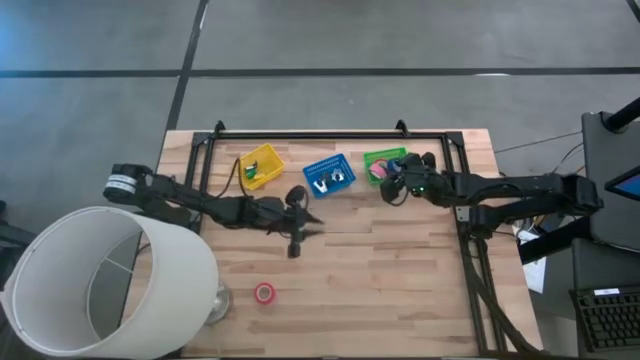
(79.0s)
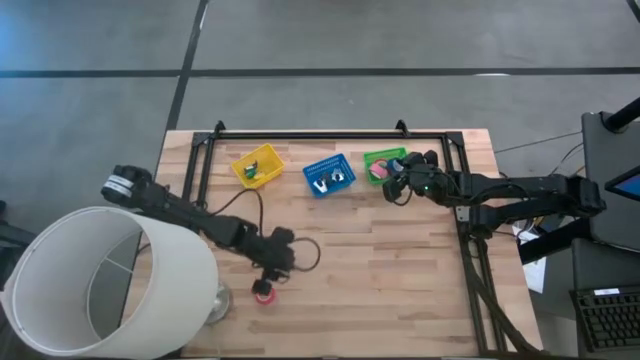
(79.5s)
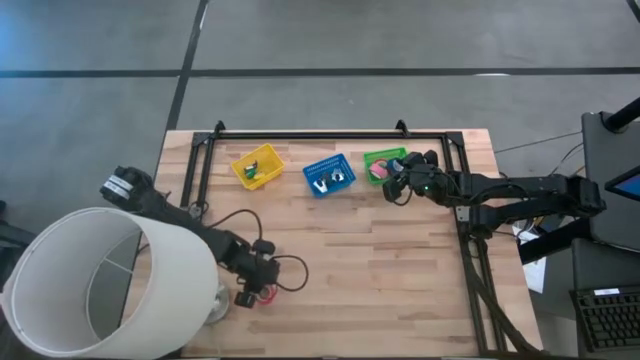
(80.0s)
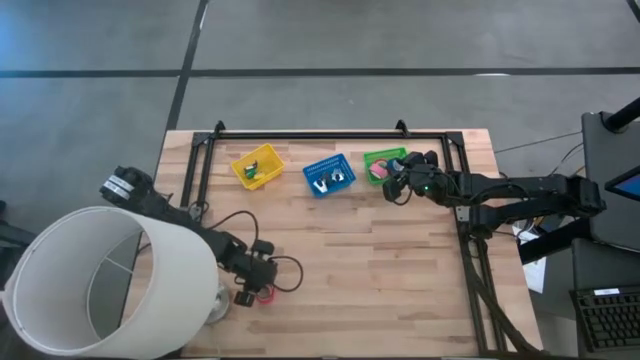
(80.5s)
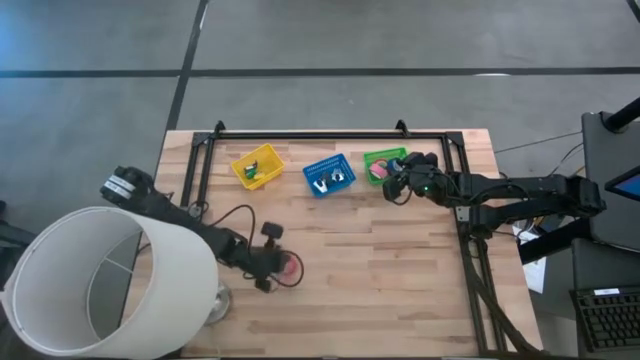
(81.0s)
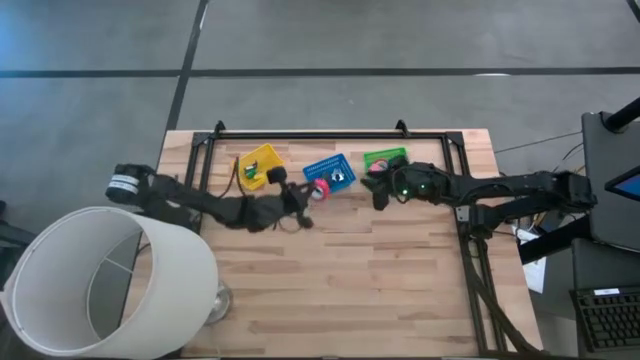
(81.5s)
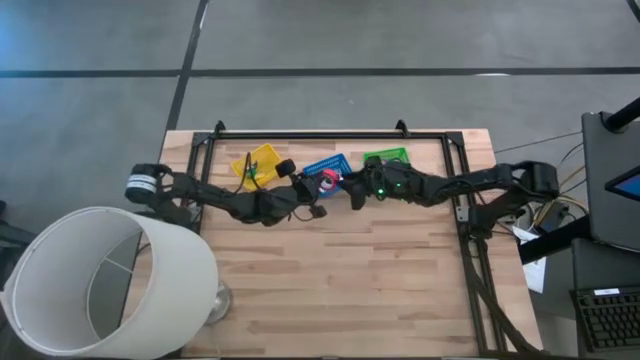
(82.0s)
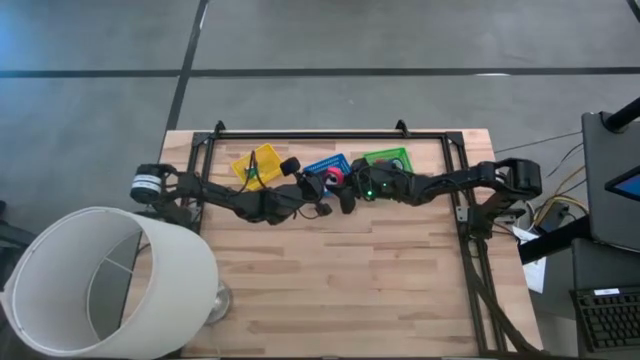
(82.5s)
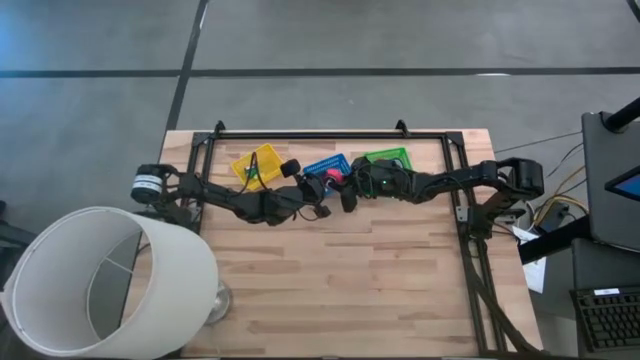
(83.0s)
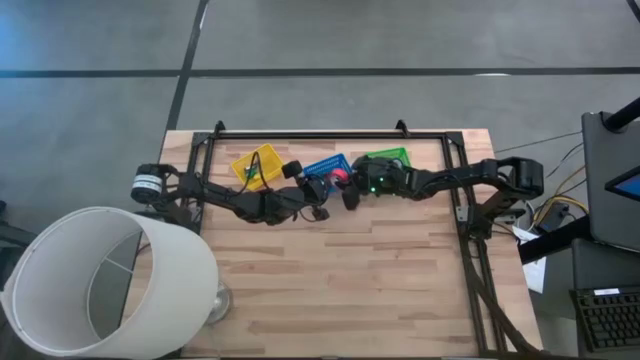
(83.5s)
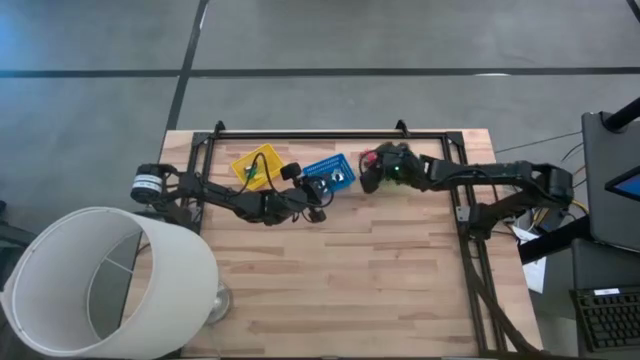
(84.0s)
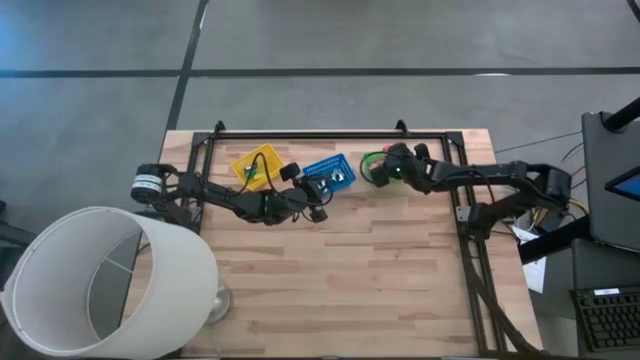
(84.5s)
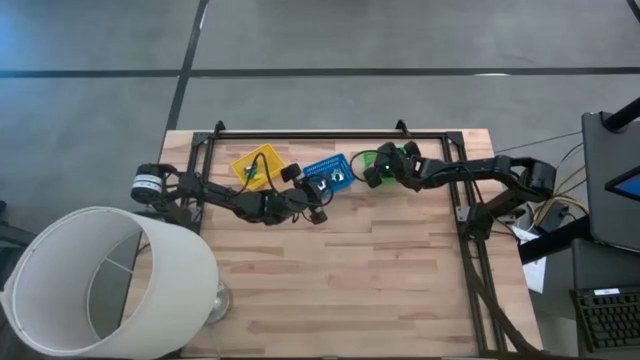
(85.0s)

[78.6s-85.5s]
Task: Pick and place Stapler, Stapler remover, tape
Put the red tape into the green basket

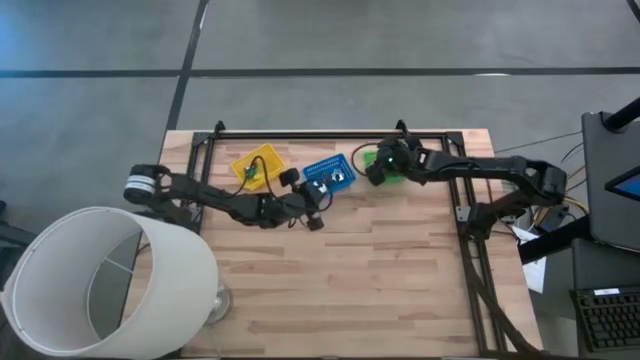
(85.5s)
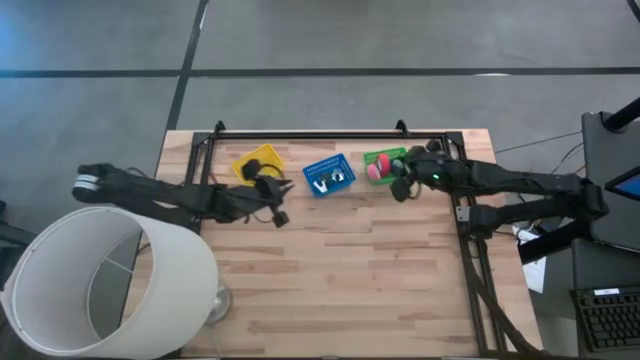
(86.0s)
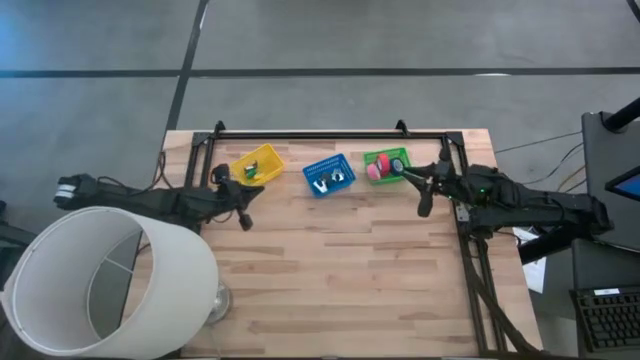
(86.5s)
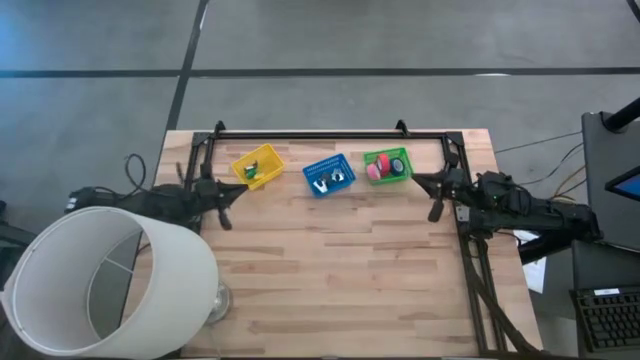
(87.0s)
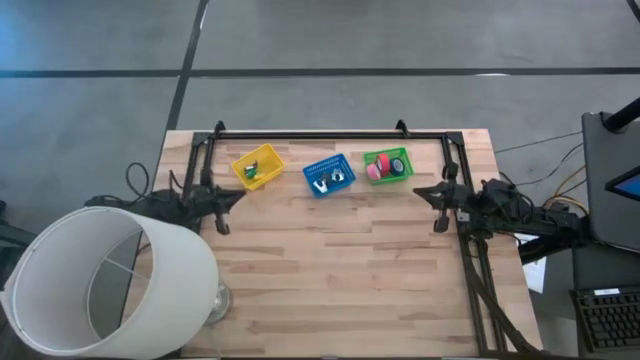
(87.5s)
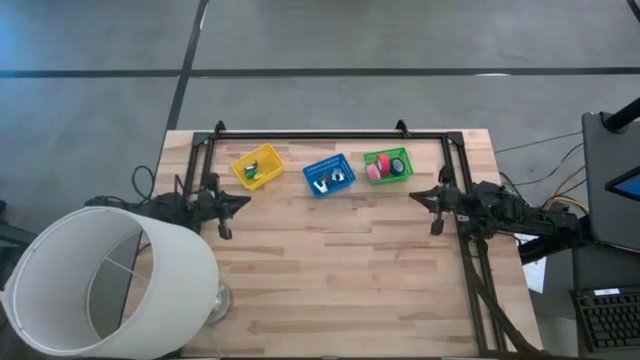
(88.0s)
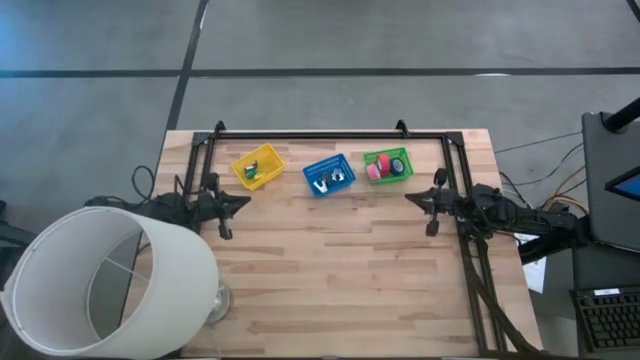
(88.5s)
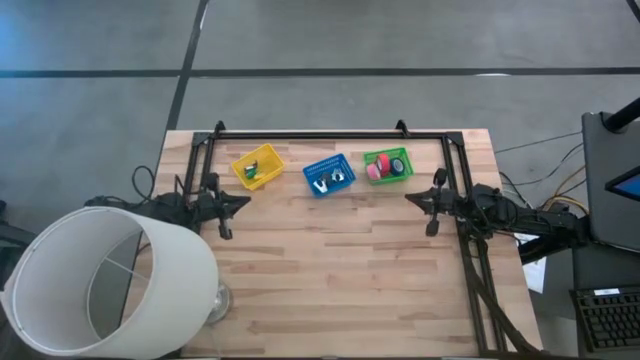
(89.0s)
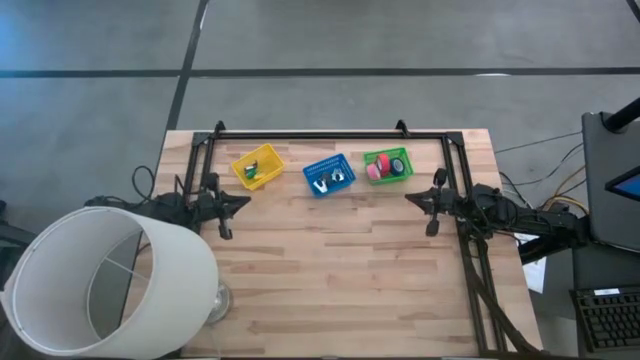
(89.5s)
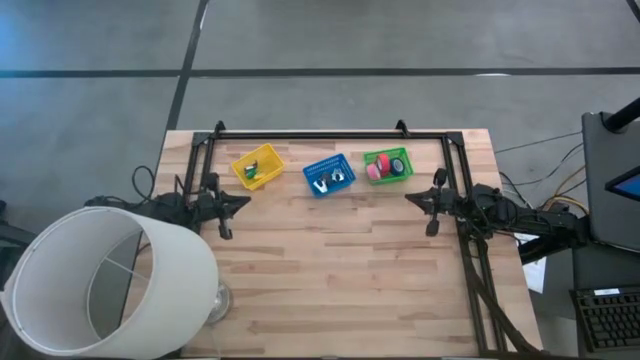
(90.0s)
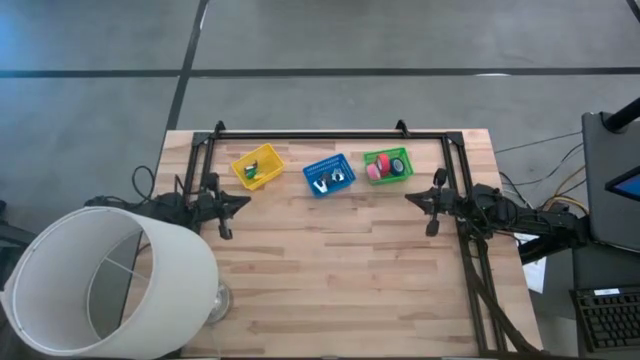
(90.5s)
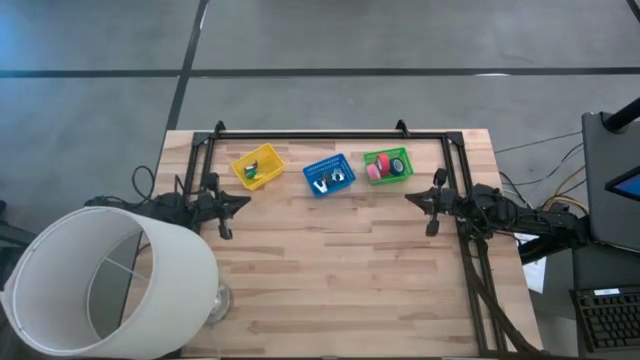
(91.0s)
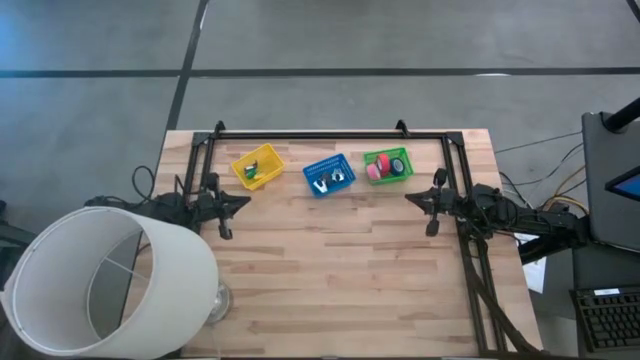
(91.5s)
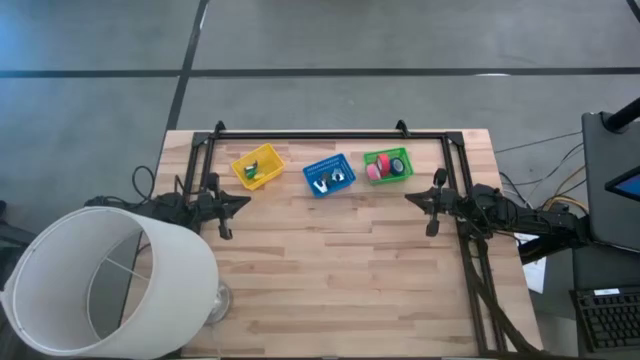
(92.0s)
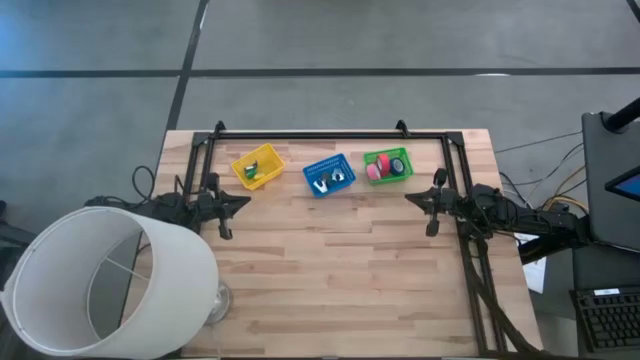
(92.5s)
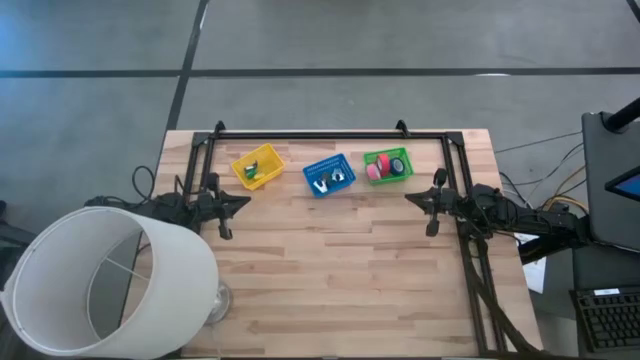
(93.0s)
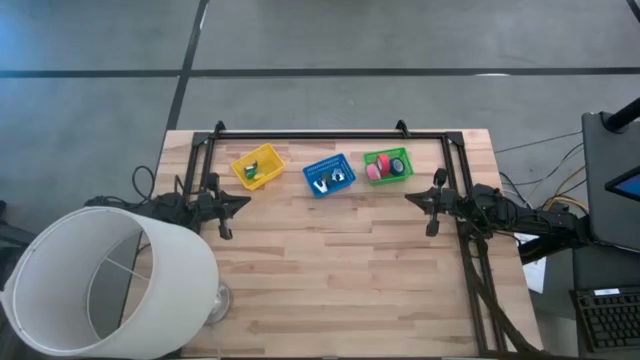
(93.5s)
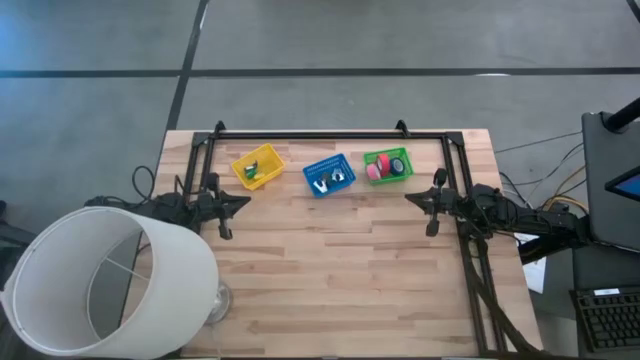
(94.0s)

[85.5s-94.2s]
Return to Home Position

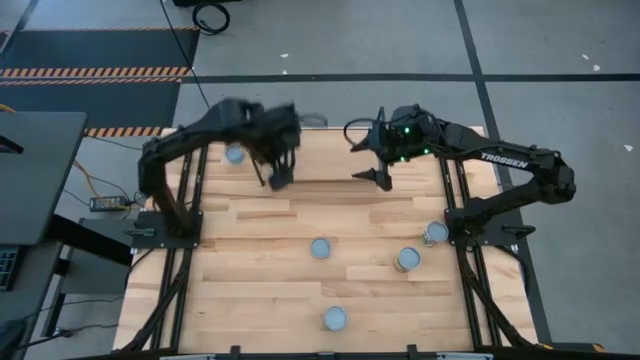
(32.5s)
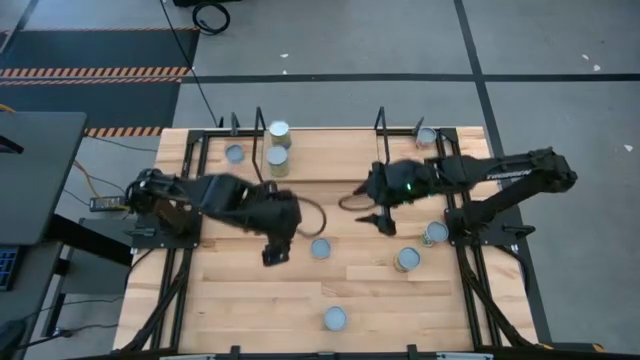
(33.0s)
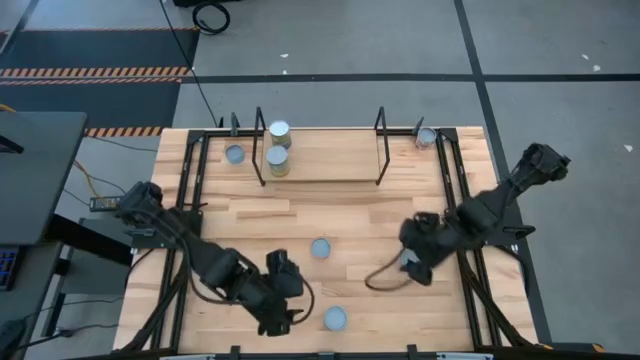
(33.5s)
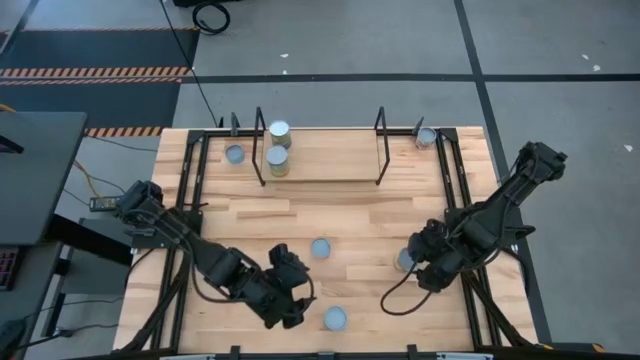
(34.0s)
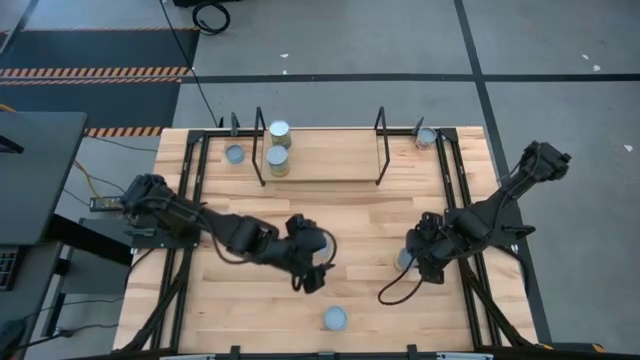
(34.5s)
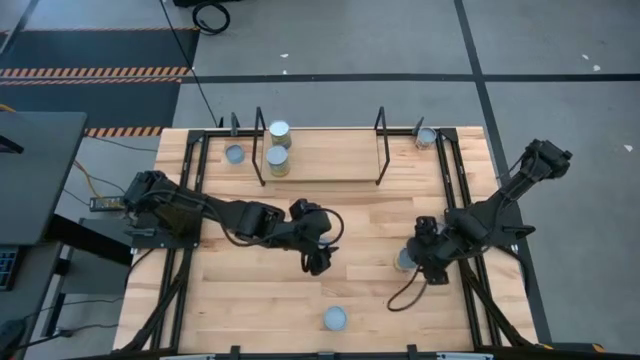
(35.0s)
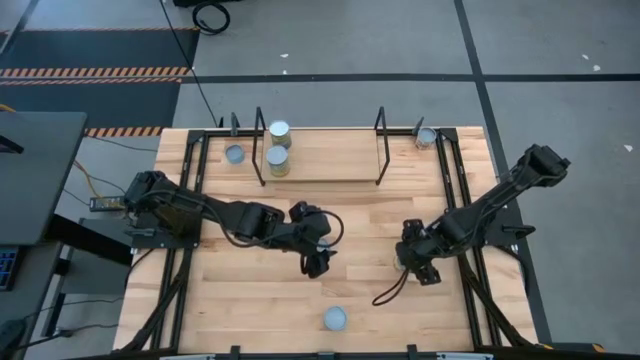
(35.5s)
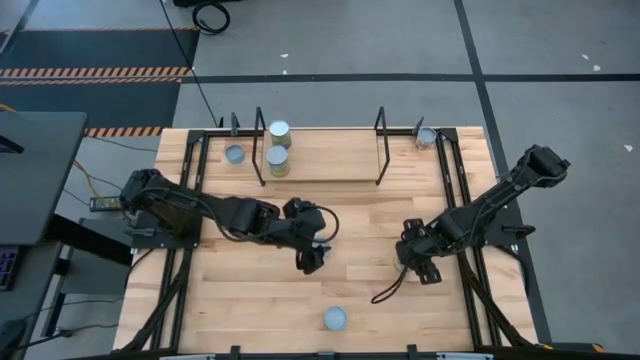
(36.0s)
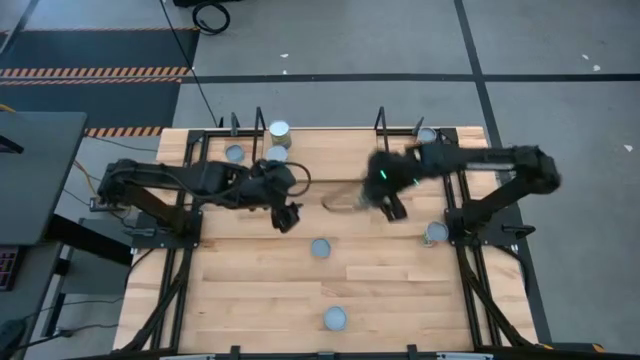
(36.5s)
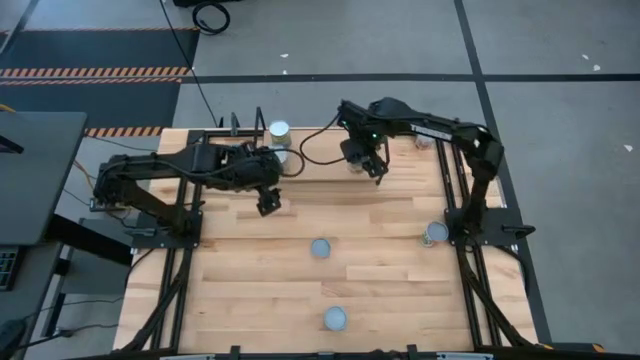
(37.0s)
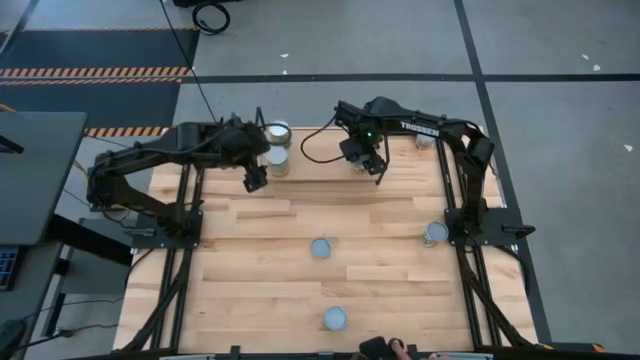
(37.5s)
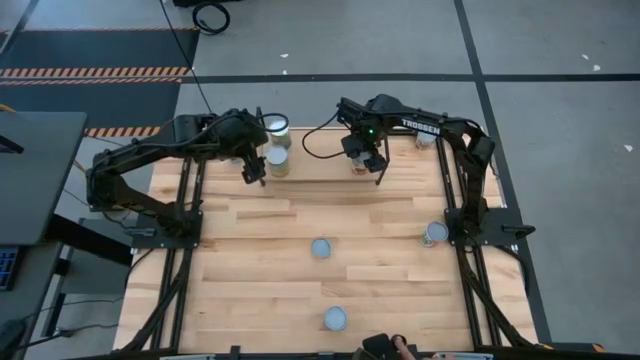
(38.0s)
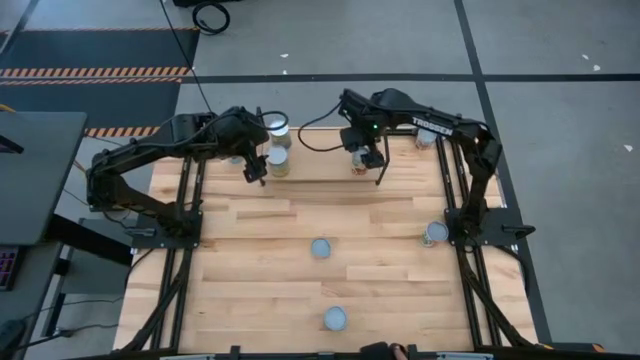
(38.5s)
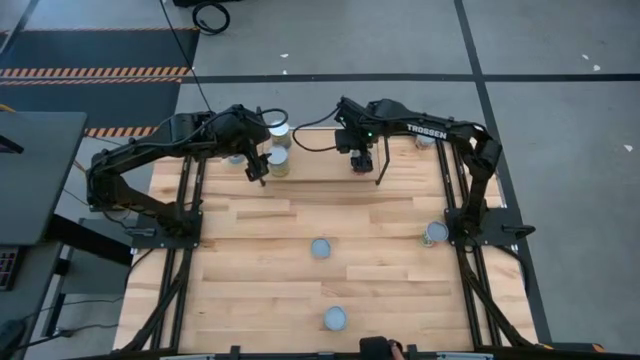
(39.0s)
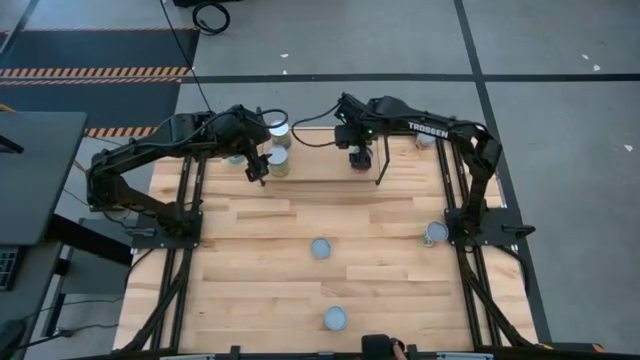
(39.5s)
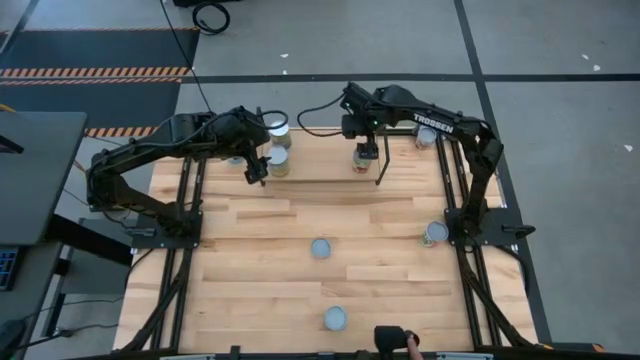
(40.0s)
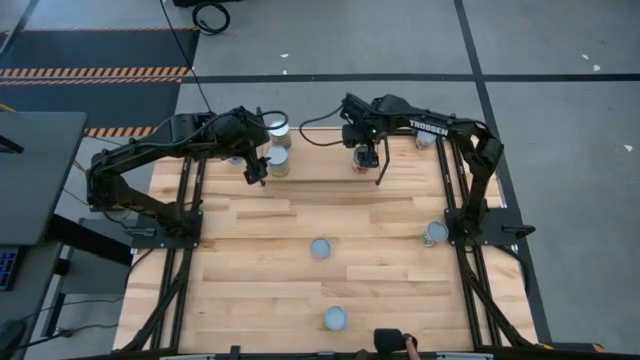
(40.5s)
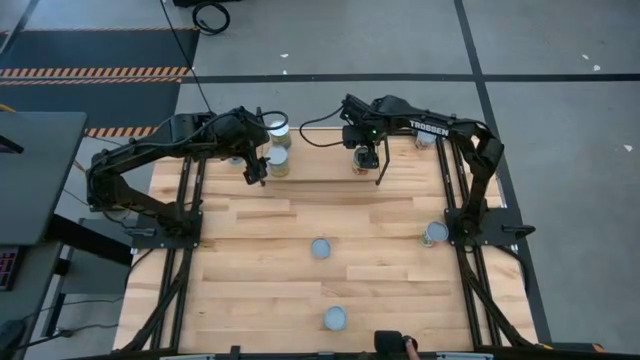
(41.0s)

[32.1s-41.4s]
Task: Pick and place cans onto a shelf
Put the light green can on the shelf
